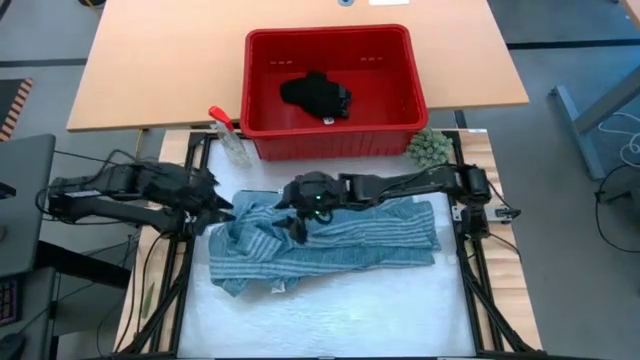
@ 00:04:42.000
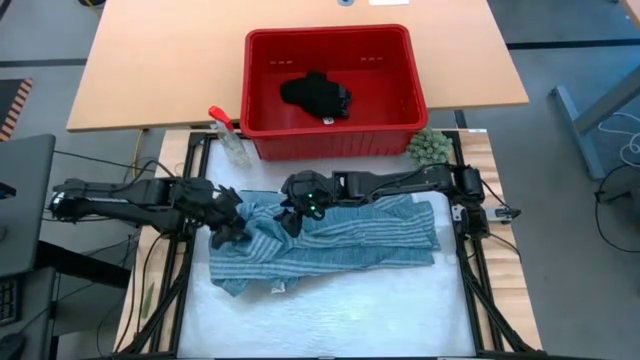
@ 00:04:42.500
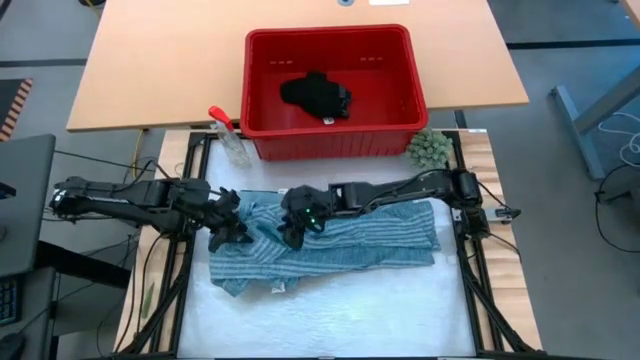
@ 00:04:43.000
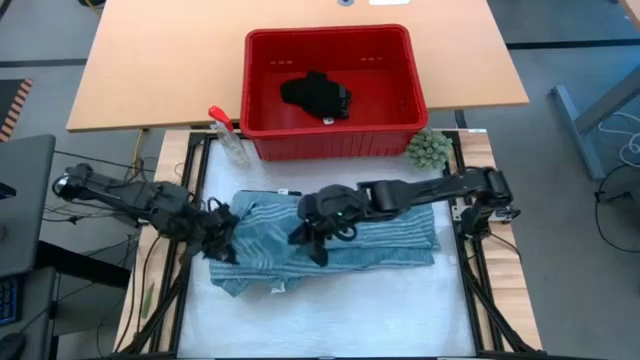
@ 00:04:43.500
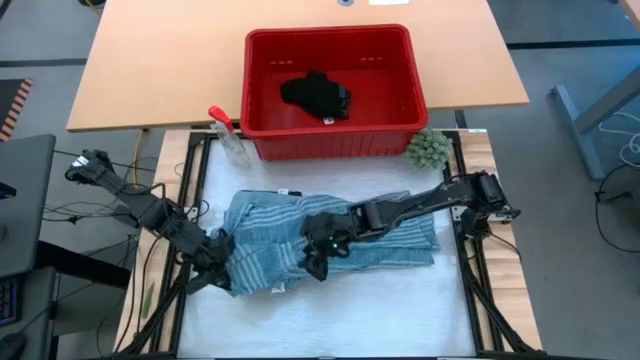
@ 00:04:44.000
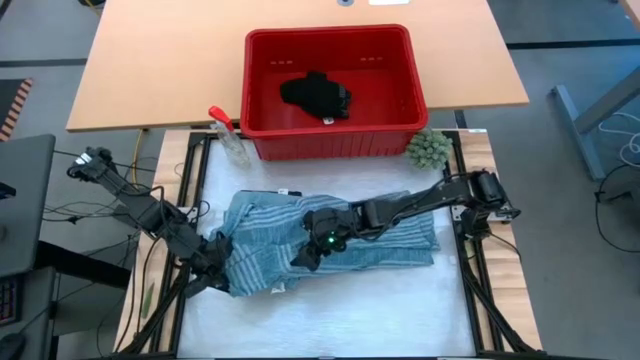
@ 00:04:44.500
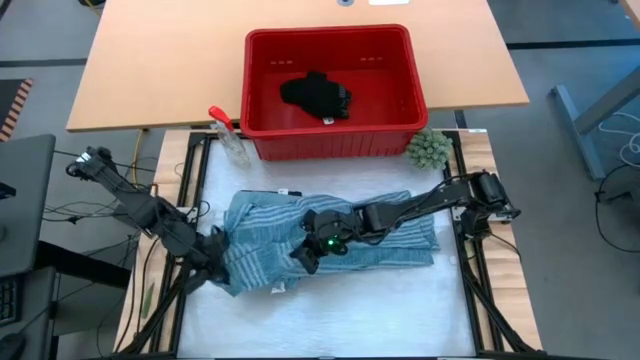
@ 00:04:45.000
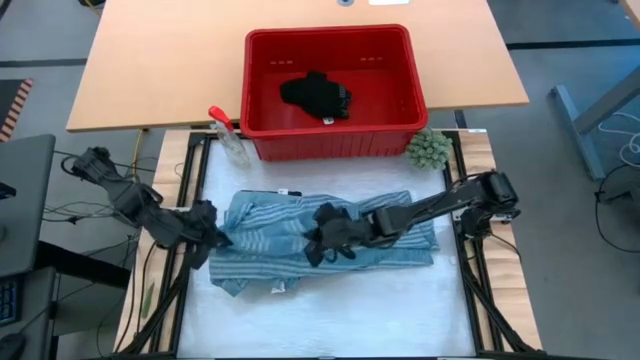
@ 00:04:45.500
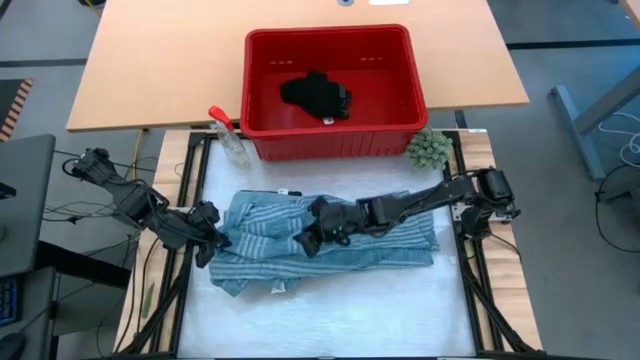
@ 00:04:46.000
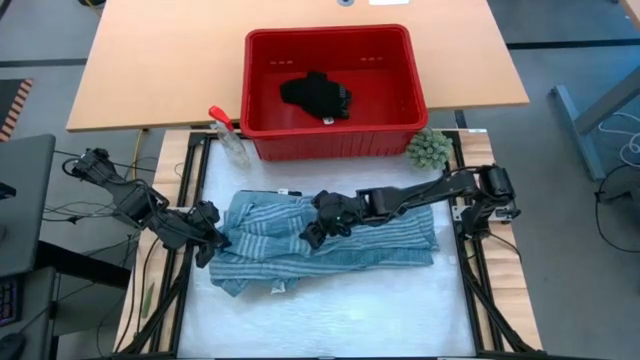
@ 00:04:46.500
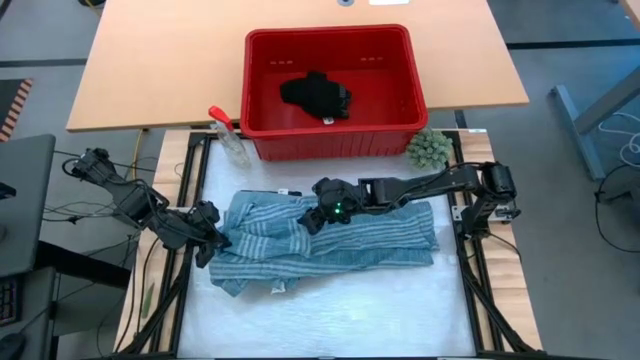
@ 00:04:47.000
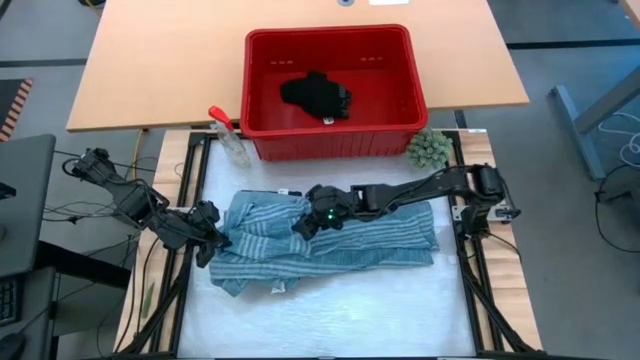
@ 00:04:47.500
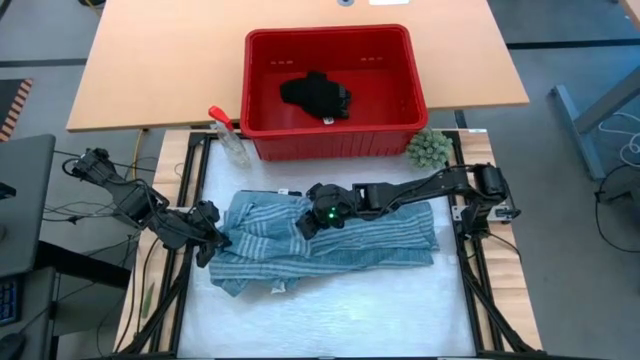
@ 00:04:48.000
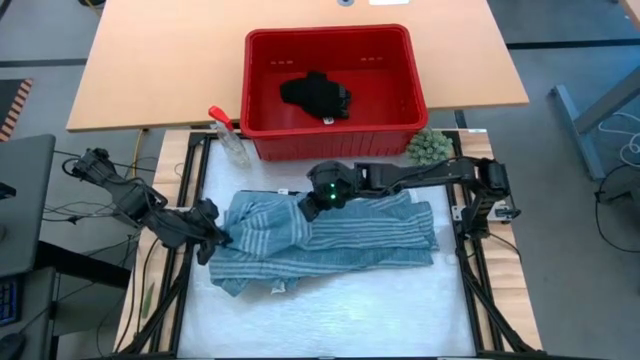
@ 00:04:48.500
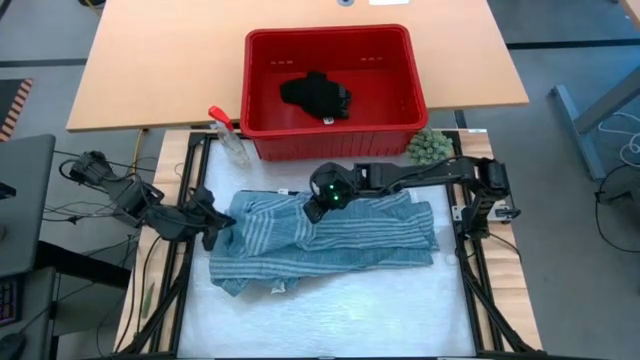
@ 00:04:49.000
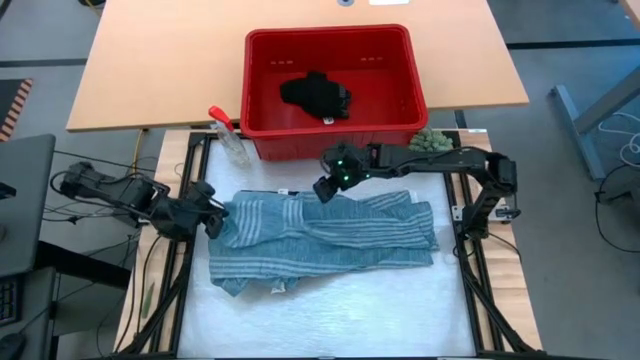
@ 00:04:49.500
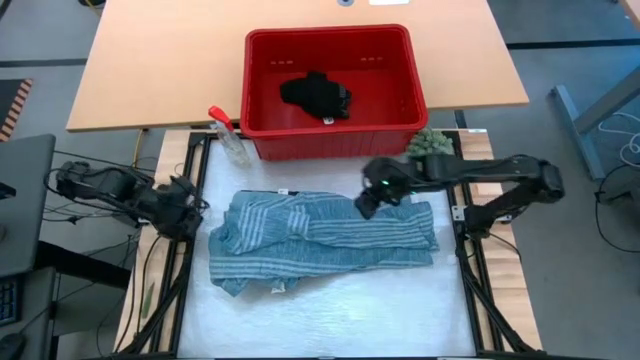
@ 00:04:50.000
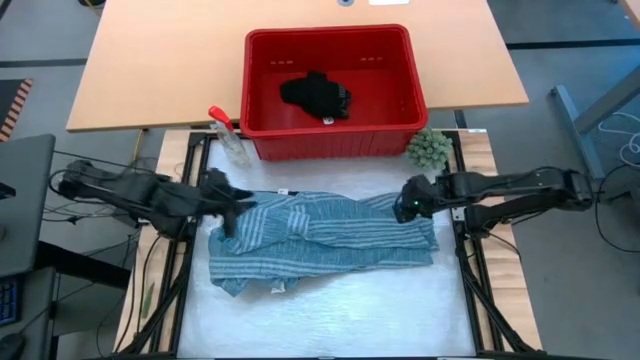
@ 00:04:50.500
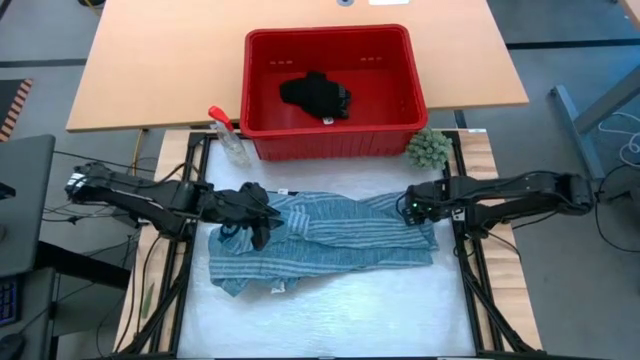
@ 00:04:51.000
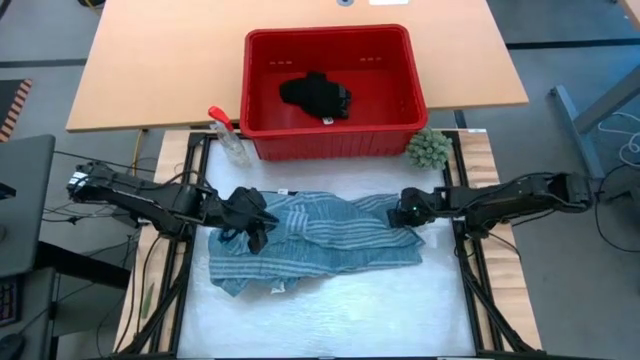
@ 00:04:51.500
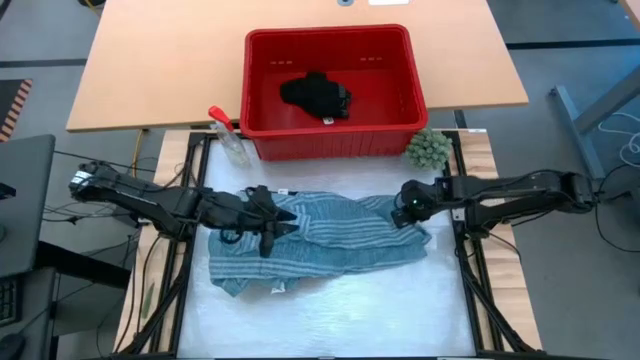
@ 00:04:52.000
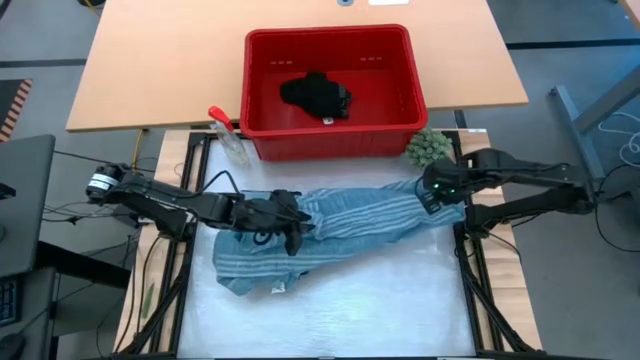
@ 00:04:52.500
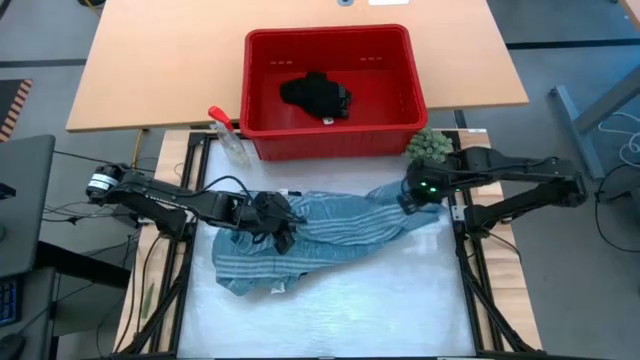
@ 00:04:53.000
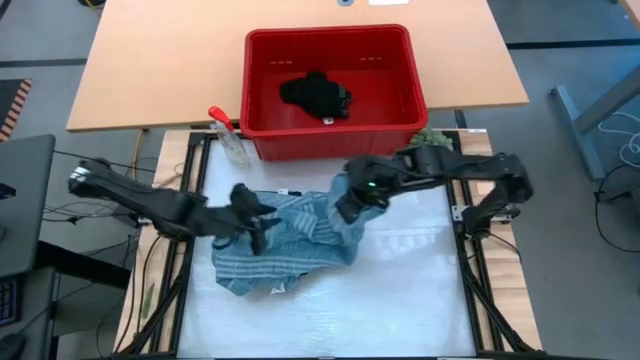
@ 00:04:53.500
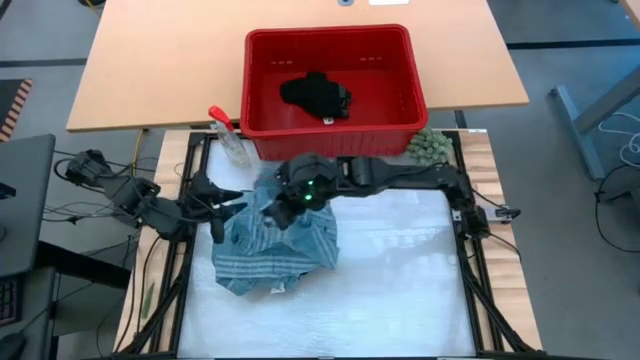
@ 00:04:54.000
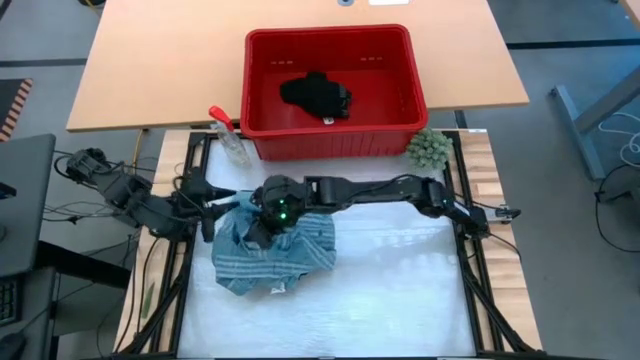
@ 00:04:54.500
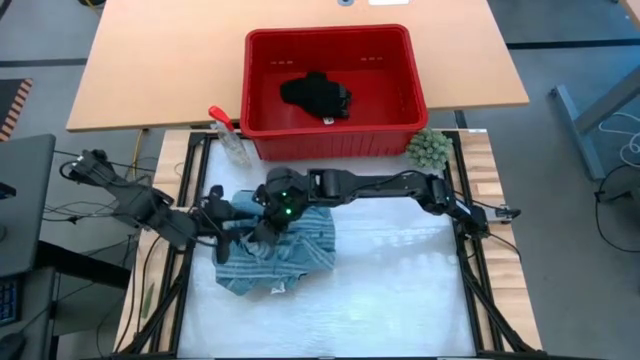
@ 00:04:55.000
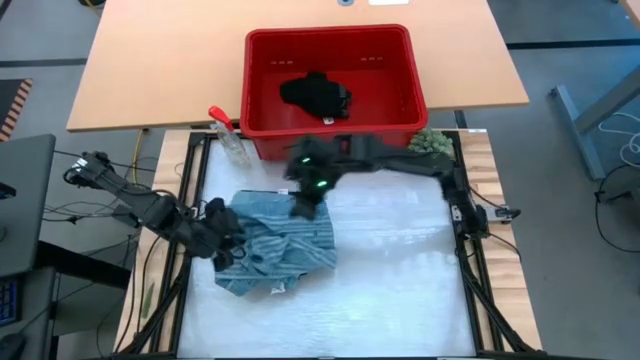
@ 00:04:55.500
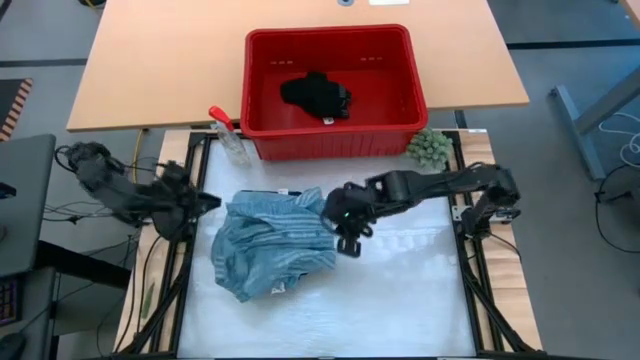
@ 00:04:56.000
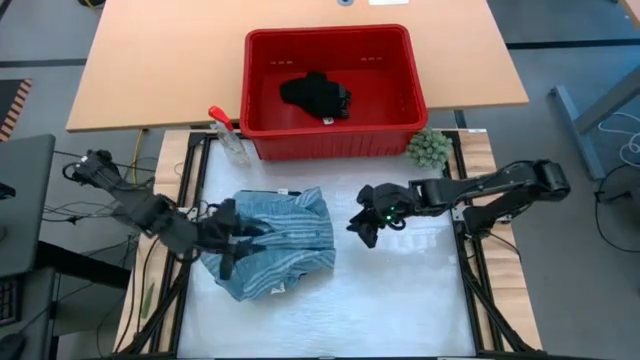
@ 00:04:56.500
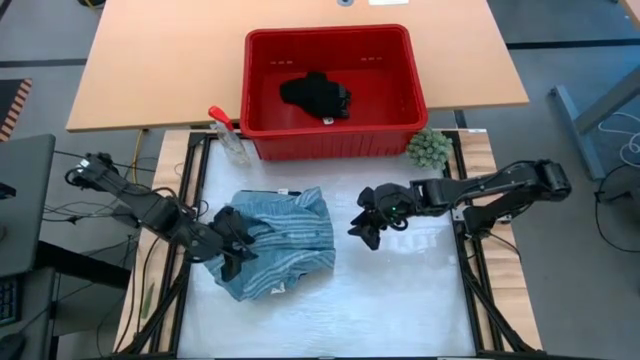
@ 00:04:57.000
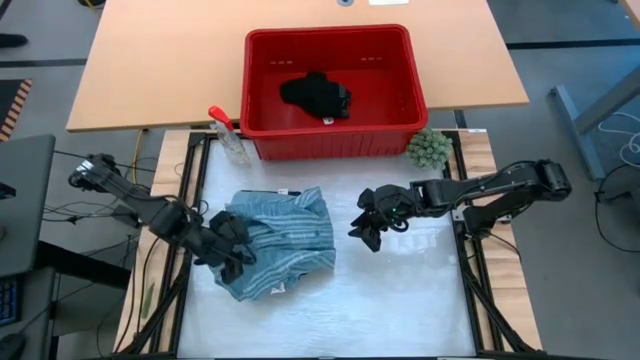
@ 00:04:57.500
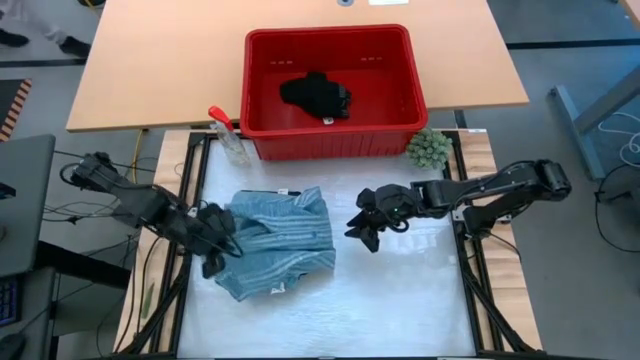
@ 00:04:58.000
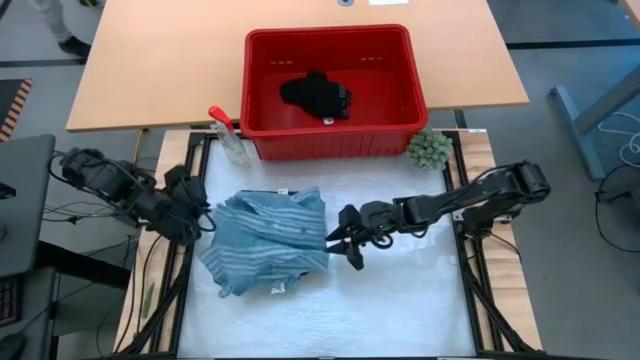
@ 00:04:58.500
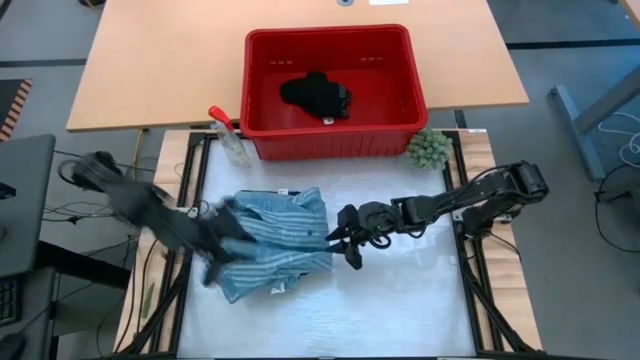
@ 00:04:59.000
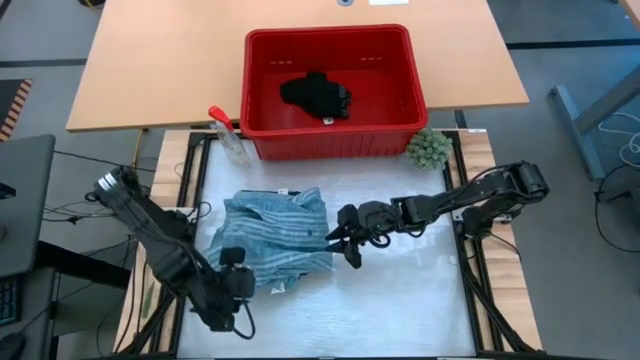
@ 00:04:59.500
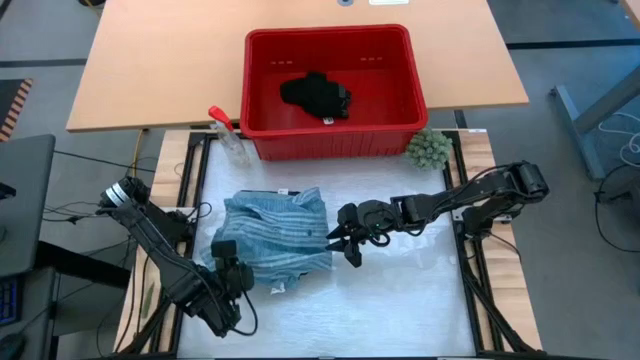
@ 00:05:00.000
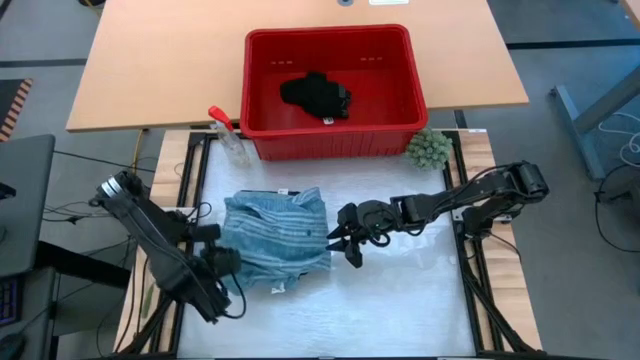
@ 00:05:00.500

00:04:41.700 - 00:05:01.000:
Task: Fold Laundry from Bin
Fold the light blue polo shirt

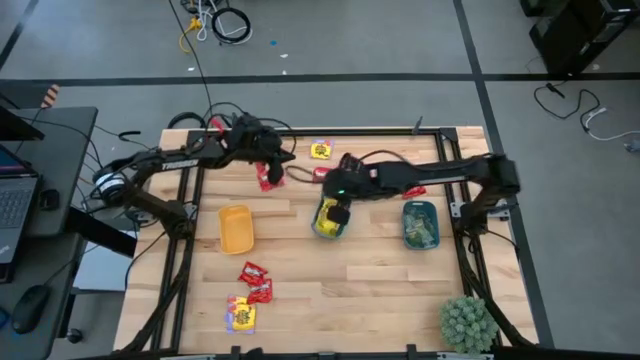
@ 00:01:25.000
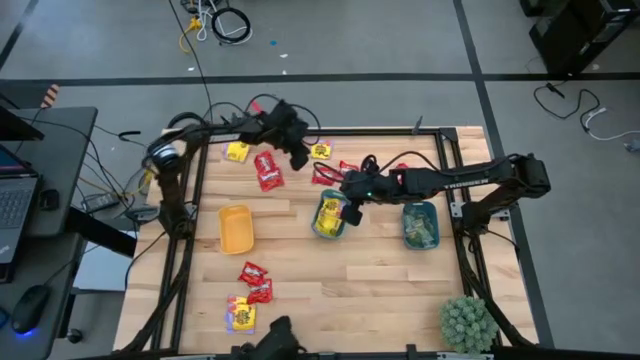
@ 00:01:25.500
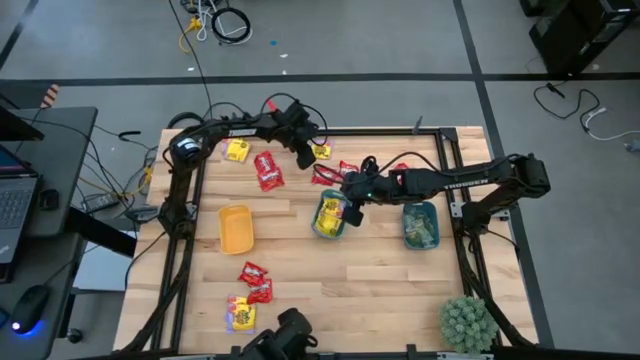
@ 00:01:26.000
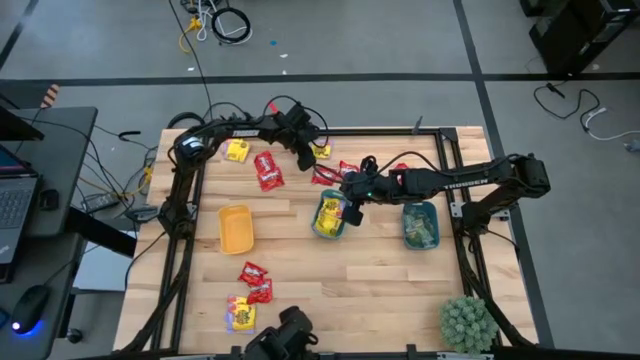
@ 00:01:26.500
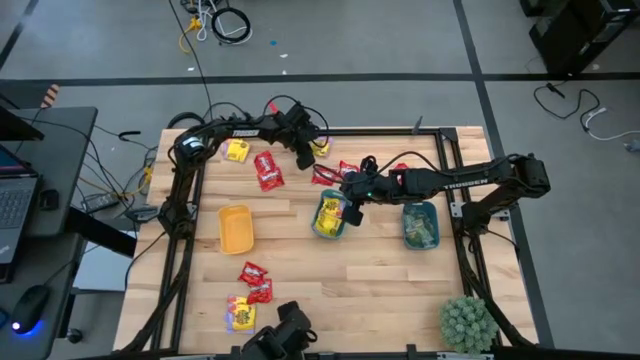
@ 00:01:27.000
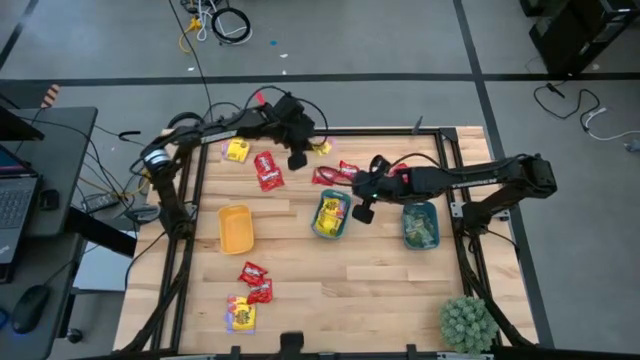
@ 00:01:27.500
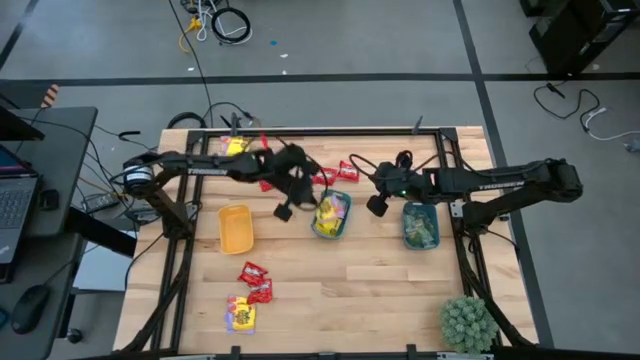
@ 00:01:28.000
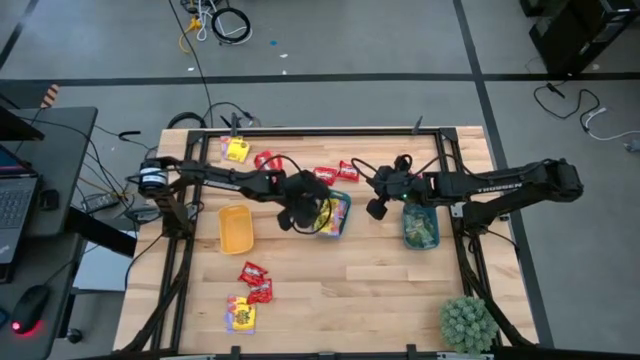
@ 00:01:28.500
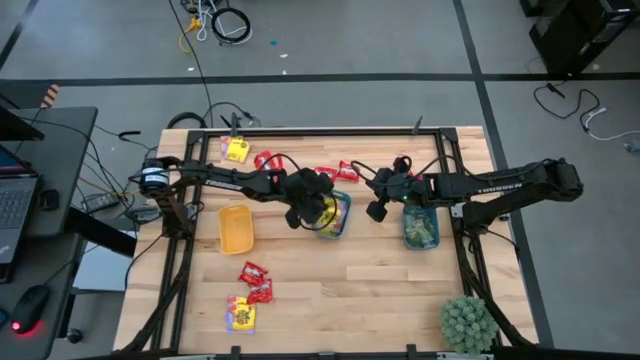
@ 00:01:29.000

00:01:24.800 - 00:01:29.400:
Task: Sort candy
Put the yellow candy pack into the green bin
